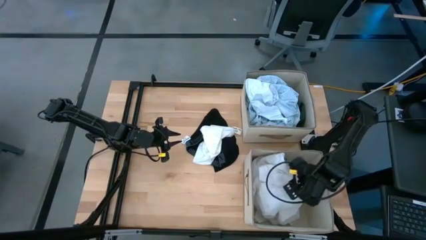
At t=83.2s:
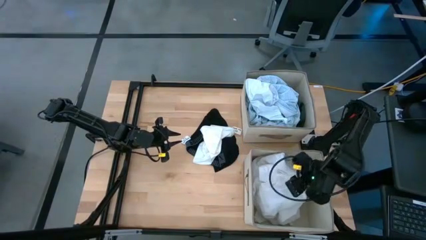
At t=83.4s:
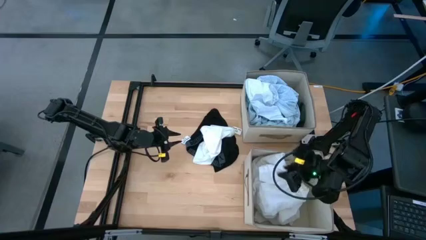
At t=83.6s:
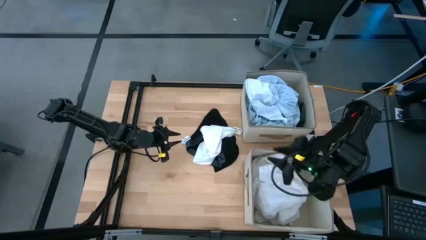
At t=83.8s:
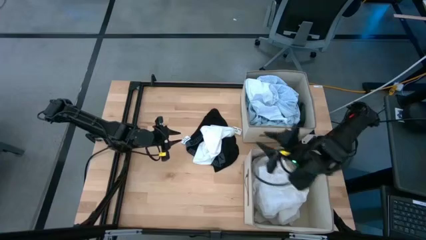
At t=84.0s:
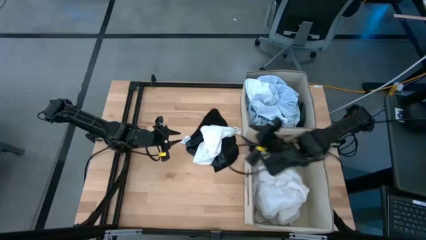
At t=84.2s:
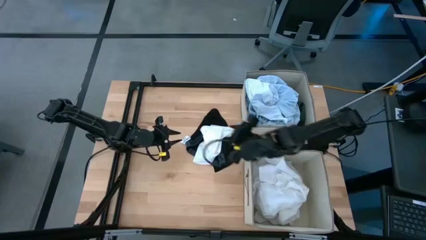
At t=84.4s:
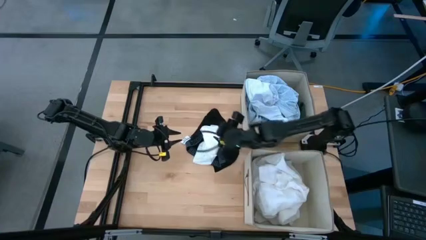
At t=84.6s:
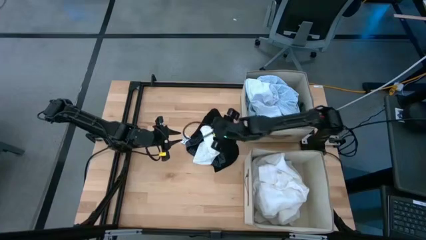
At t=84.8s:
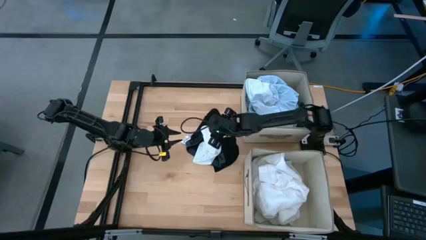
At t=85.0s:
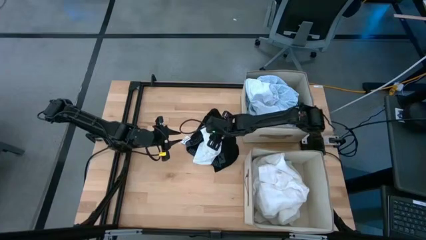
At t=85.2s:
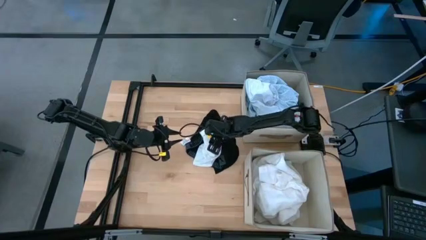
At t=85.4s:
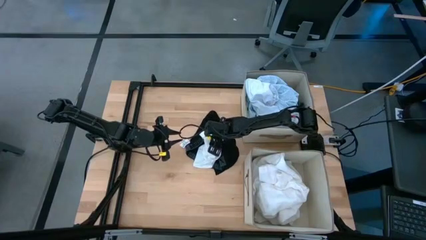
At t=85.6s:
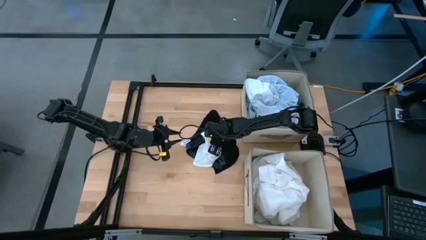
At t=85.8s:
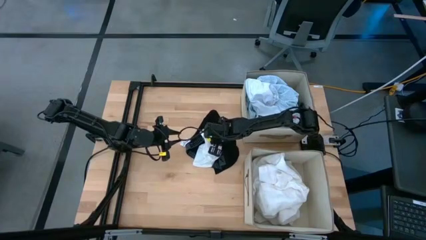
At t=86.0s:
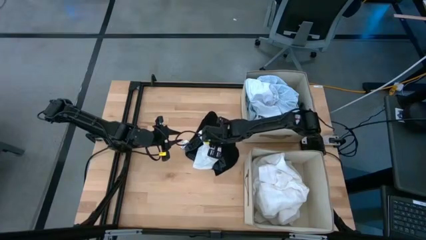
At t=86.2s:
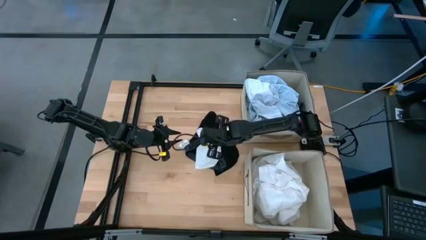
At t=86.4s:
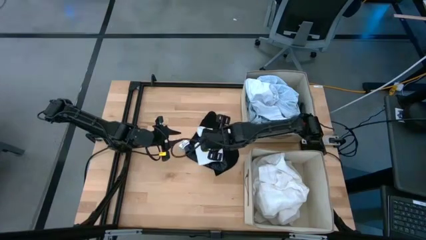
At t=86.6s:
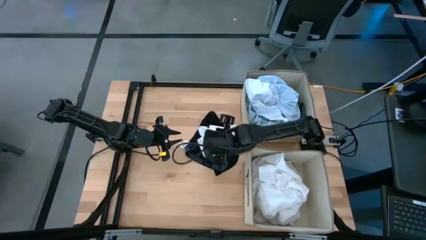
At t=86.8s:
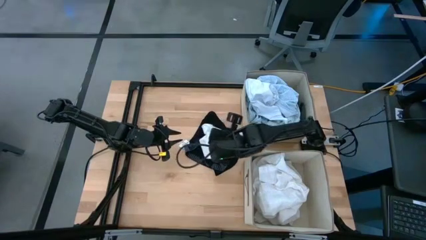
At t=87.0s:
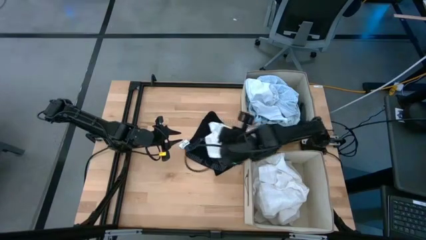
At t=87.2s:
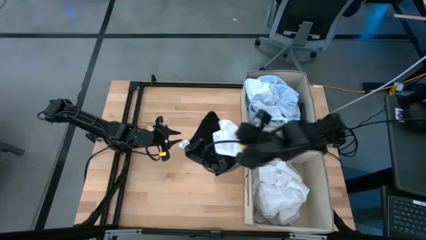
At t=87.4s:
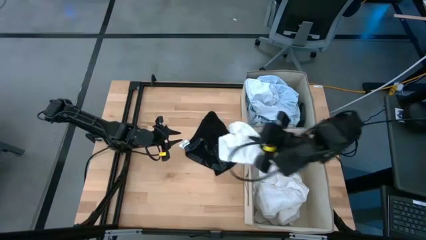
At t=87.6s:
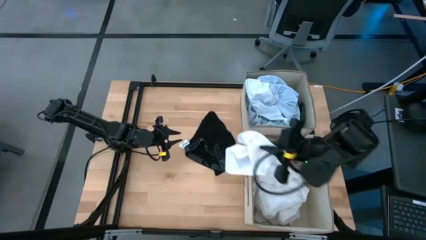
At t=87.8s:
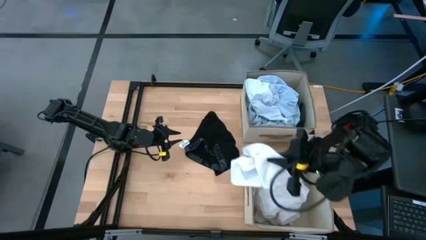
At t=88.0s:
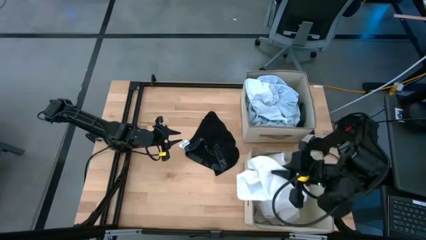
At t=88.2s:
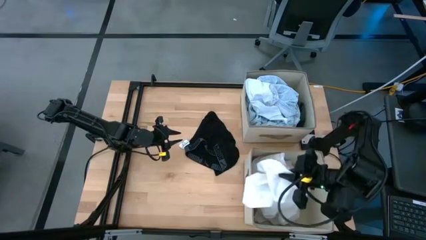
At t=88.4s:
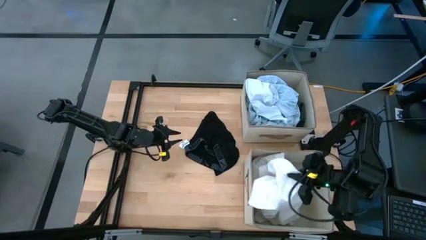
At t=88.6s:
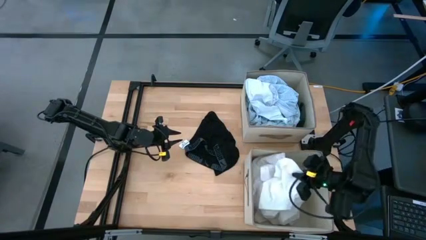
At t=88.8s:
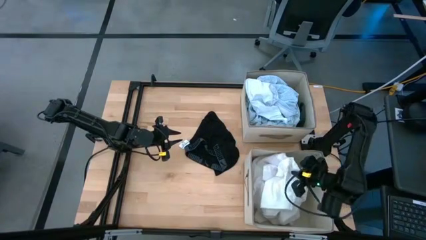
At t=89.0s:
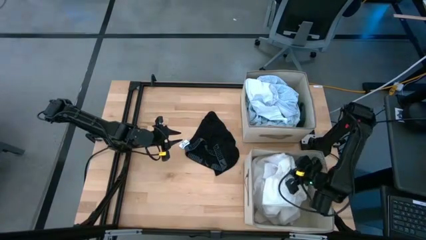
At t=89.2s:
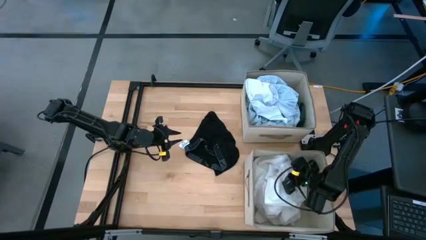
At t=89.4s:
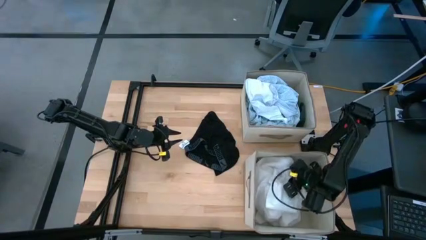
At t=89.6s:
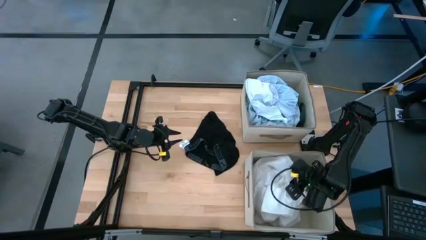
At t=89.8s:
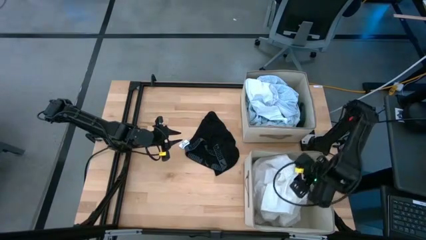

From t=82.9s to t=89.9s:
Task: Sort clothes
Put the white shorts into the bottom bin

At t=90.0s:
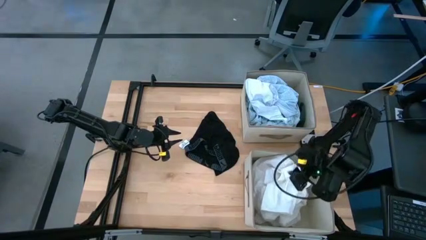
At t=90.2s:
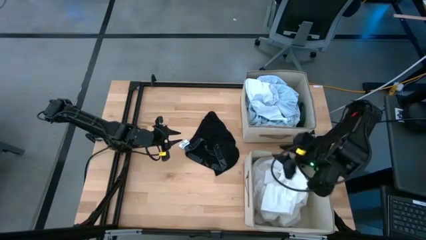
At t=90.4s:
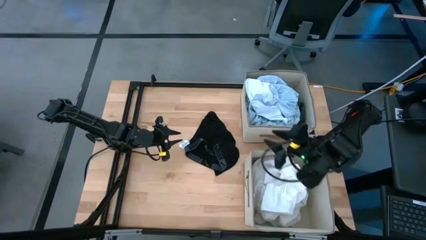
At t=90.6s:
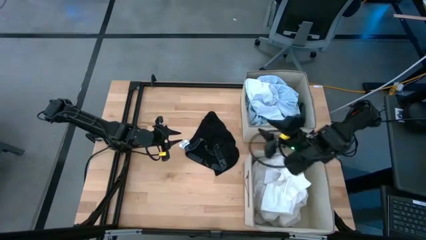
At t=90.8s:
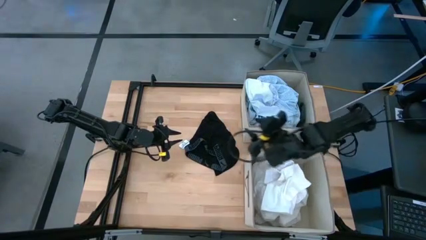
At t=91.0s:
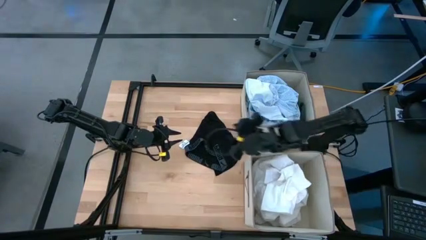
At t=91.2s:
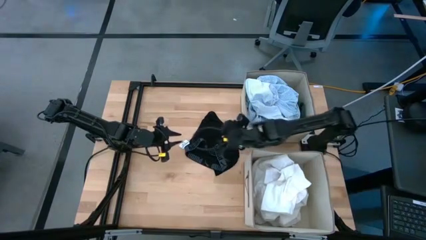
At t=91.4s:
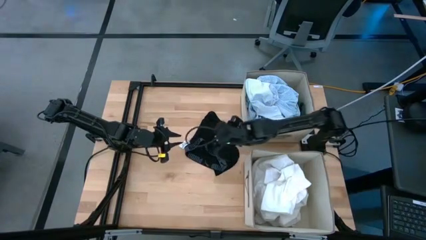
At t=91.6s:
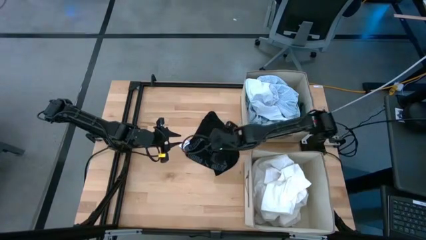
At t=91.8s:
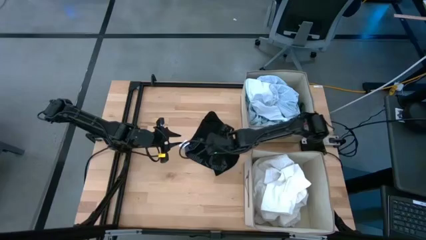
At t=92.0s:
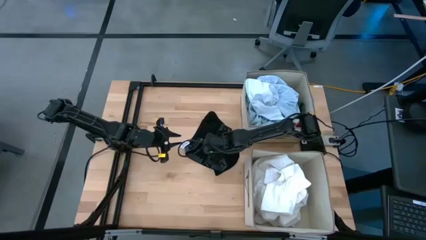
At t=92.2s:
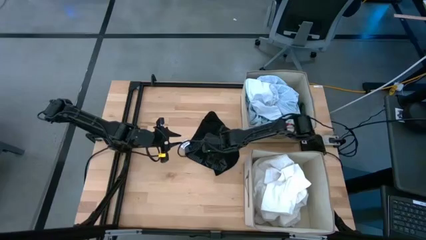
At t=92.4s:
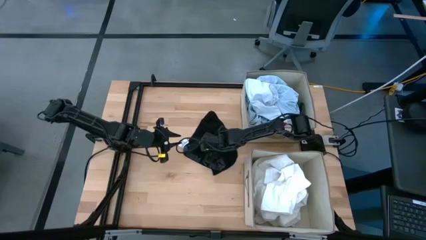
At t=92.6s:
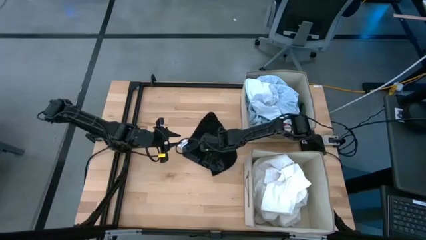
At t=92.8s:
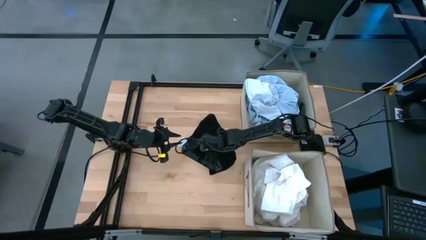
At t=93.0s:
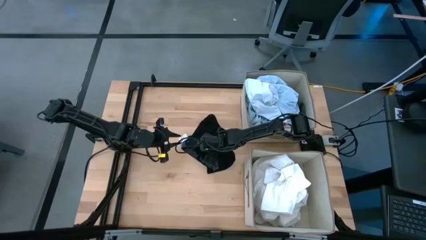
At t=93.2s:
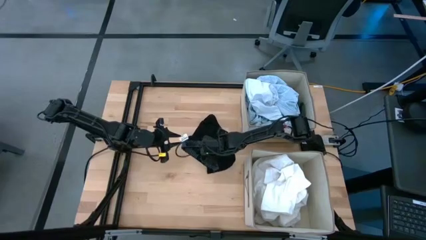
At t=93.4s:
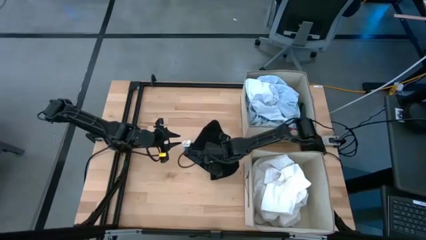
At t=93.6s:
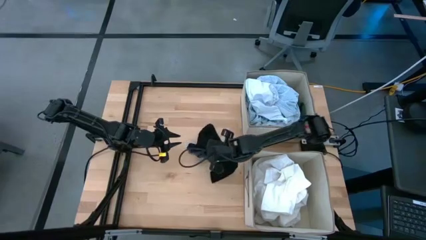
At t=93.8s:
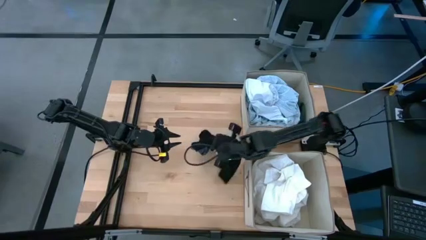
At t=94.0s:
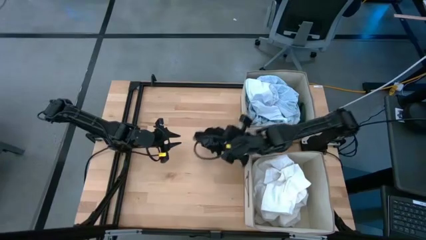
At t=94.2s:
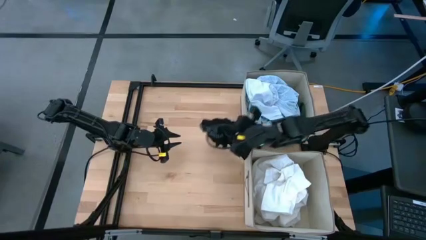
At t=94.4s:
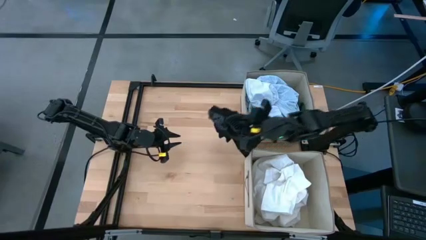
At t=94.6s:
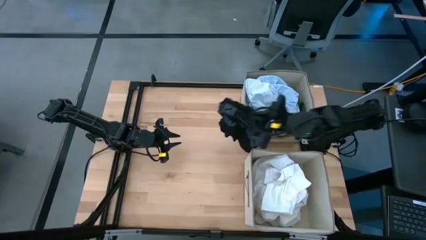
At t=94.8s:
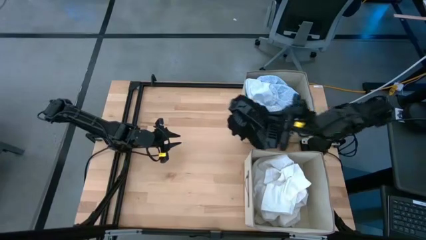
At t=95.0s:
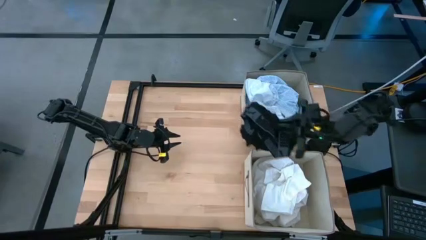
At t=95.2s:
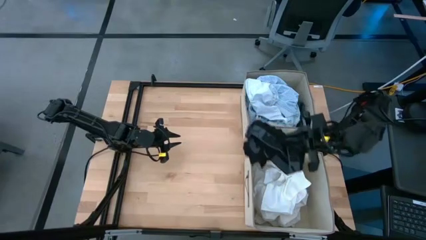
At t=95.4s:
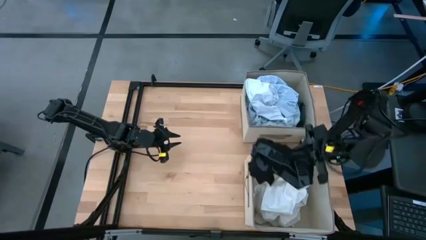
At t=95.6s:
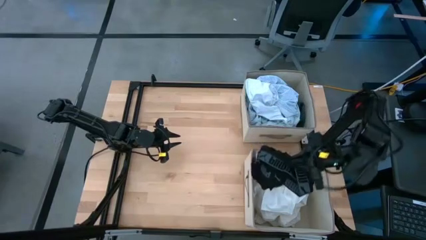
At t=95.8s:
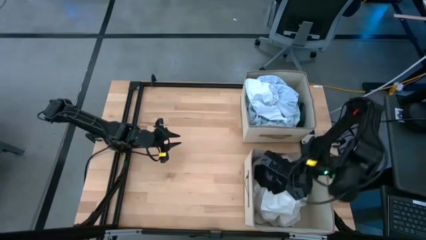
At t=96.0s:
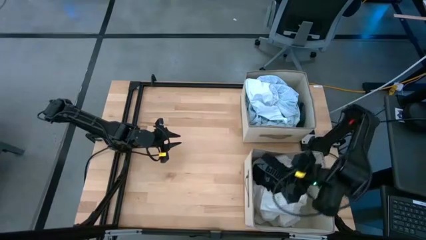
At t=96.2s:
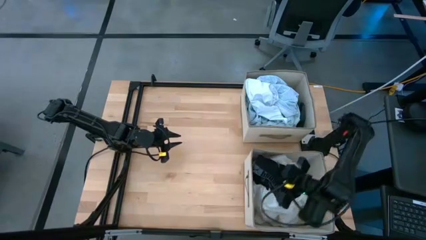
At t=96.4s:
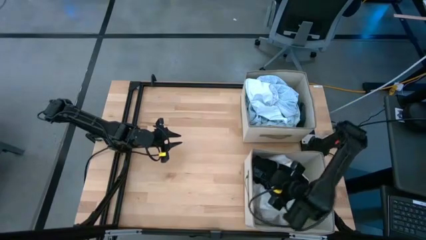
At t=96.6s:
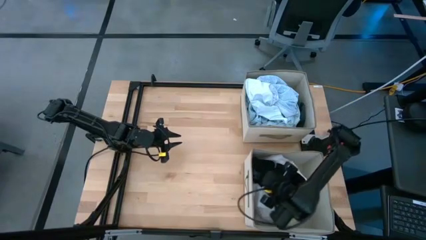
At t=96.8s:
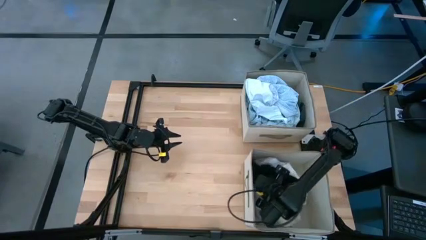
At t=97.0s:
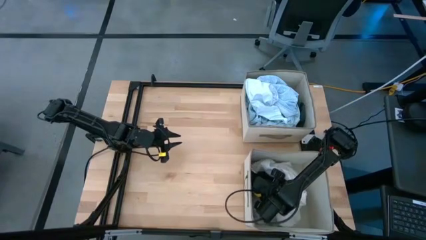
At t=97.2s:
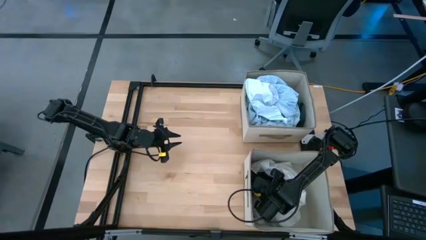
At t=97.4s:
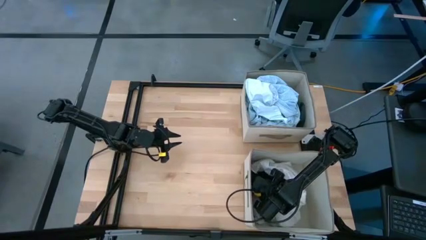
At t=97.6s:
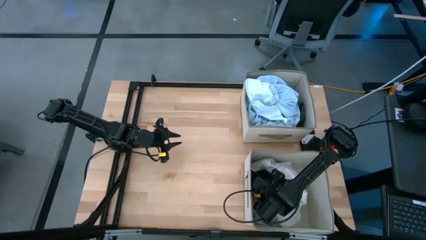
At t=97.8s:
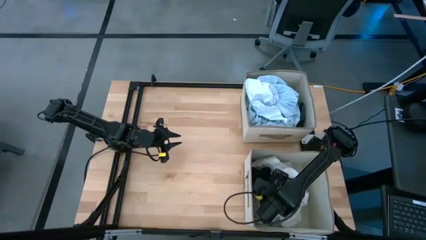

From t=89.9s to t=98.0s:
Put the black underwear into the bottom bin
